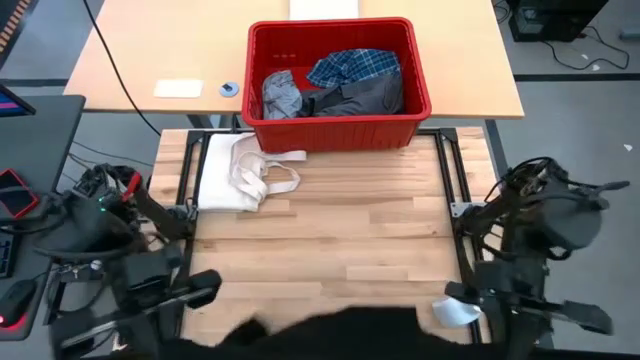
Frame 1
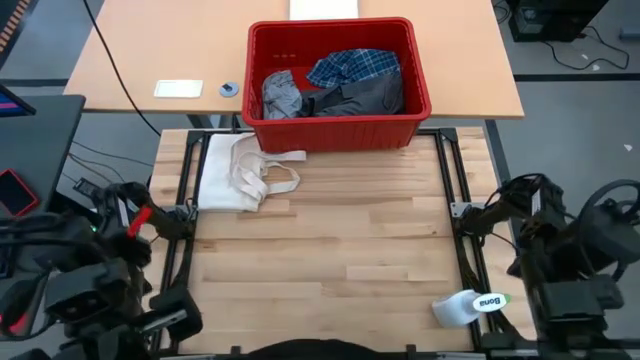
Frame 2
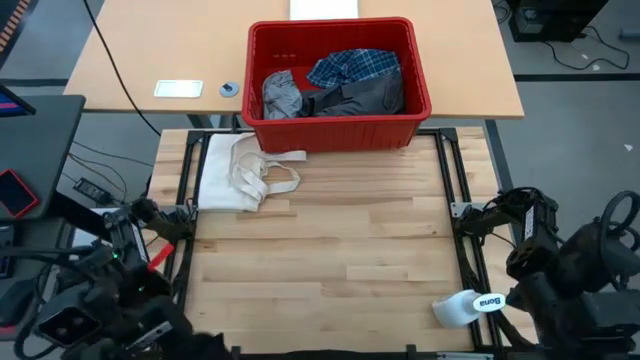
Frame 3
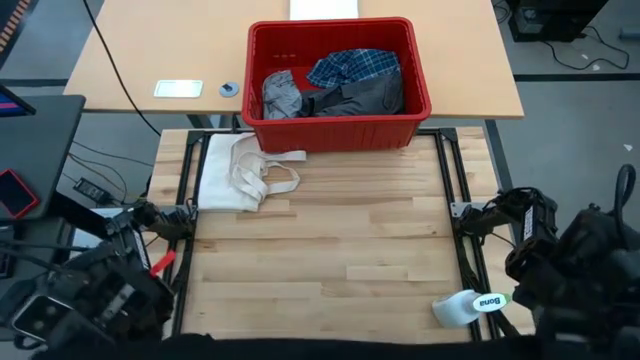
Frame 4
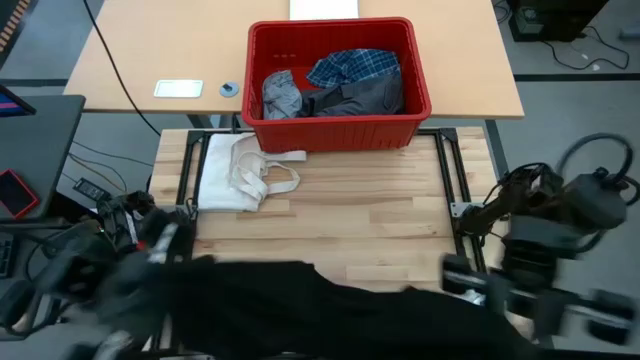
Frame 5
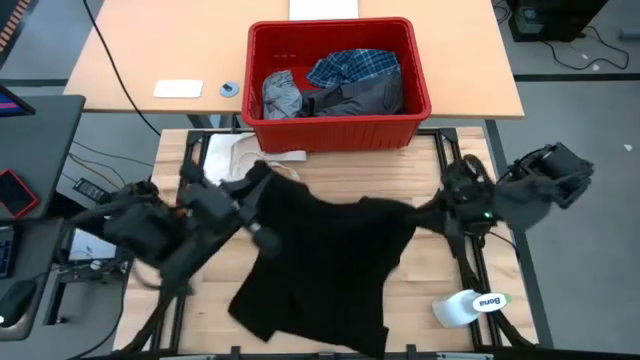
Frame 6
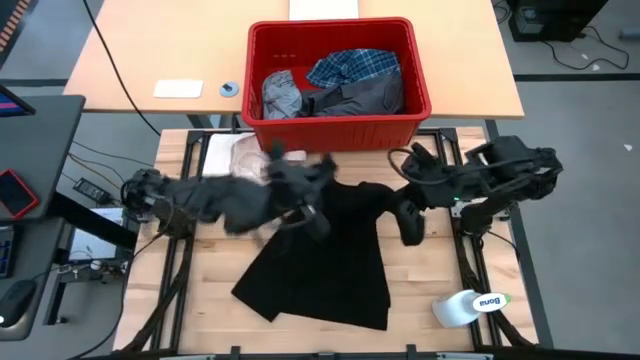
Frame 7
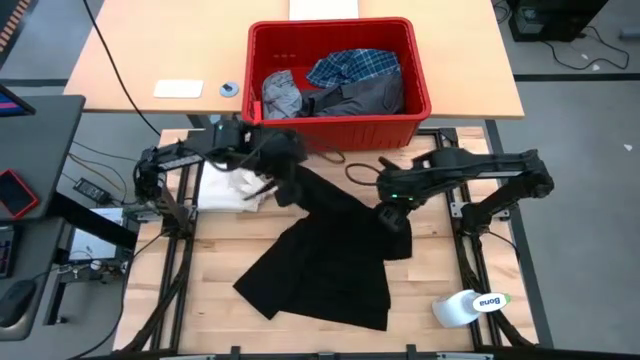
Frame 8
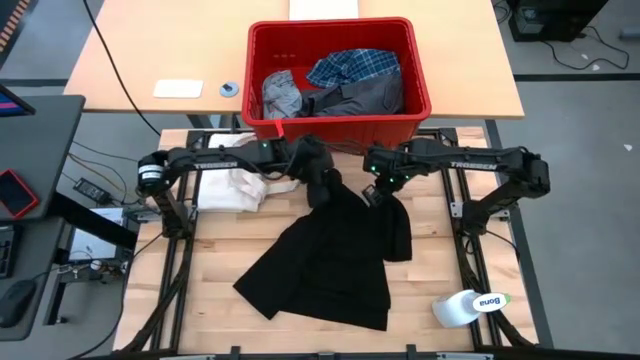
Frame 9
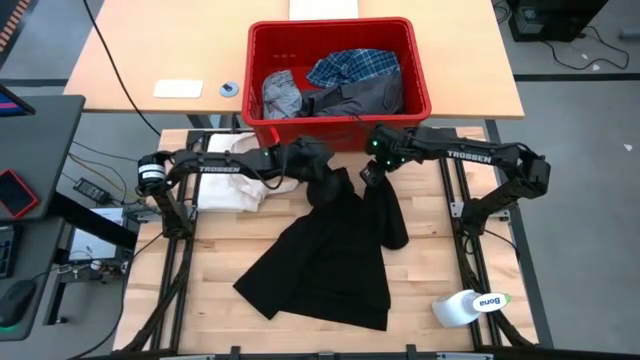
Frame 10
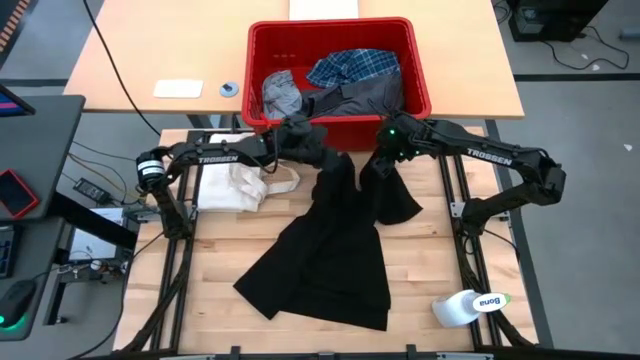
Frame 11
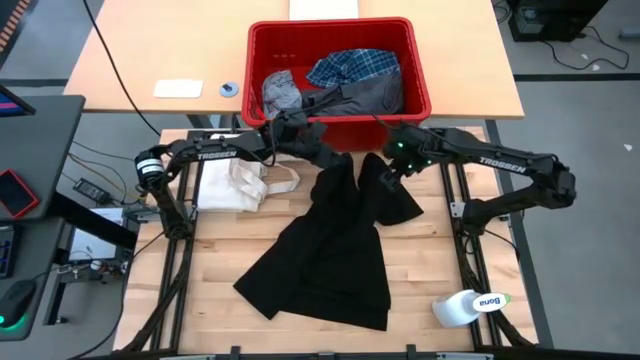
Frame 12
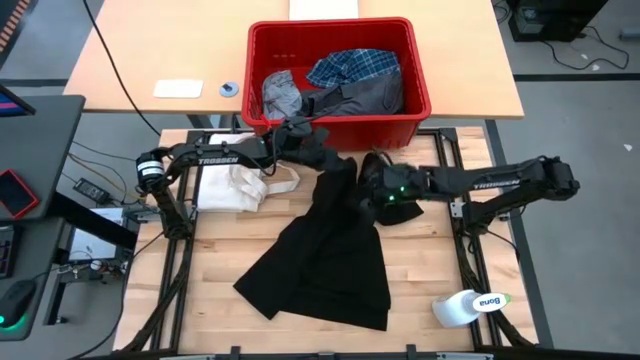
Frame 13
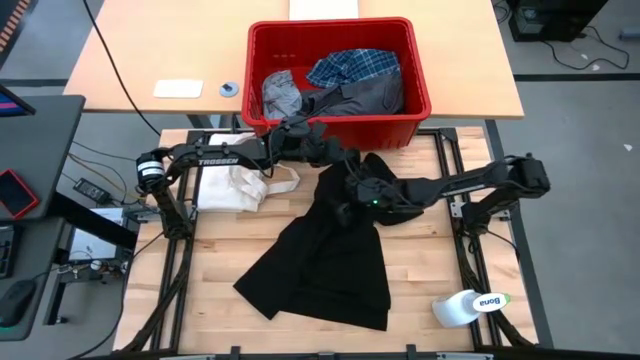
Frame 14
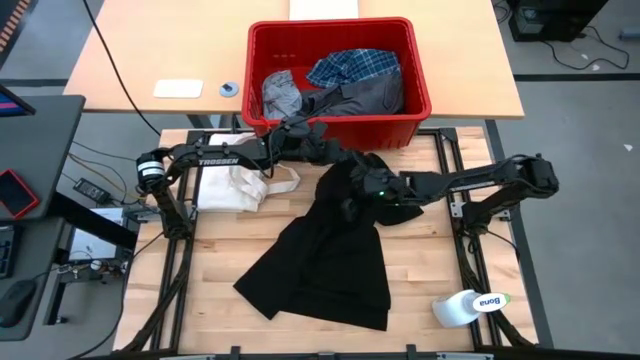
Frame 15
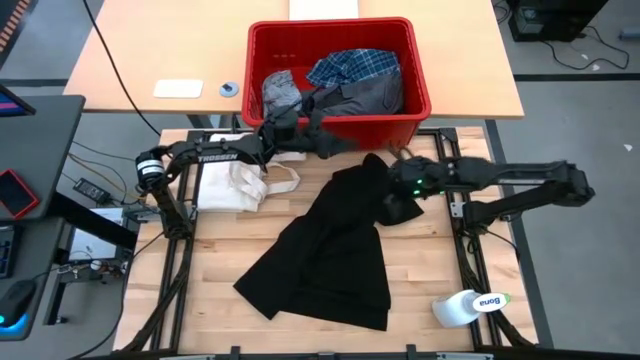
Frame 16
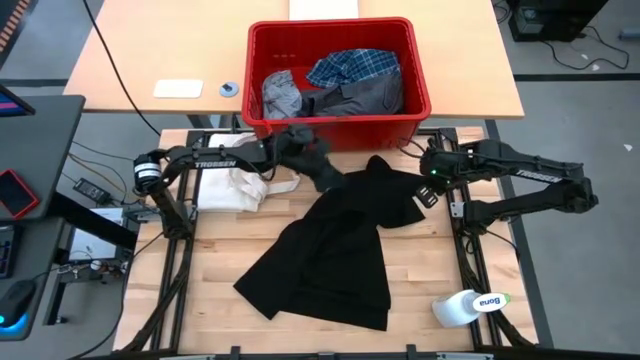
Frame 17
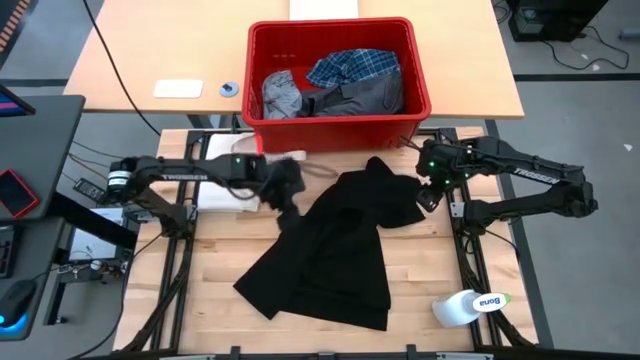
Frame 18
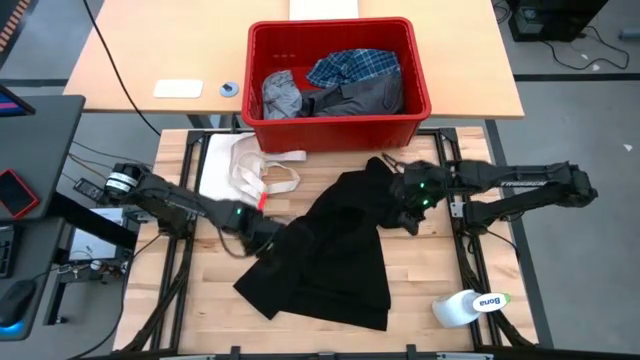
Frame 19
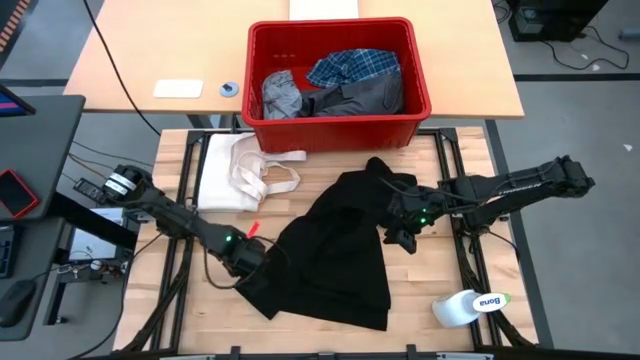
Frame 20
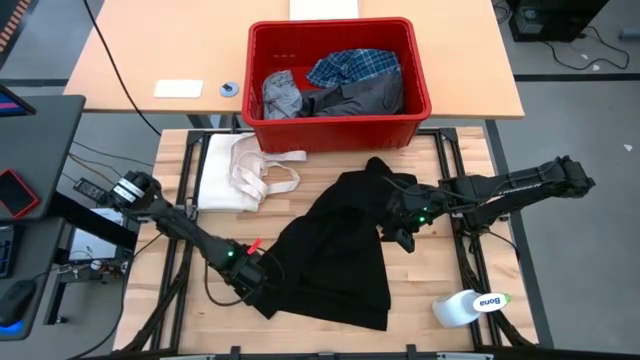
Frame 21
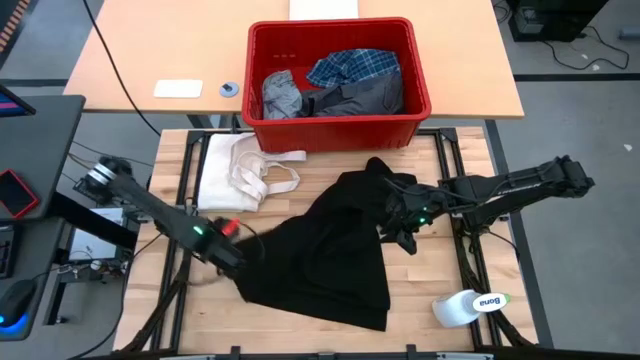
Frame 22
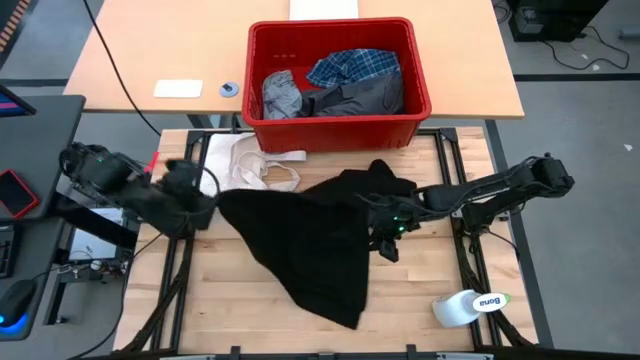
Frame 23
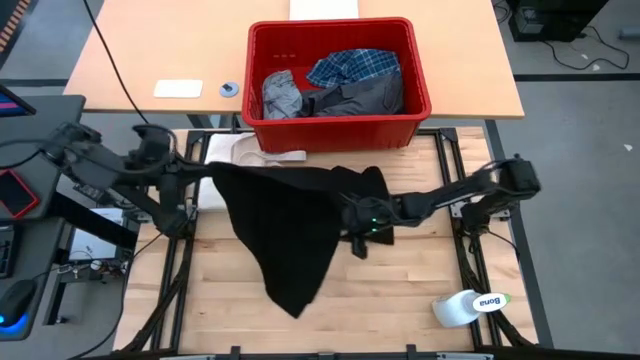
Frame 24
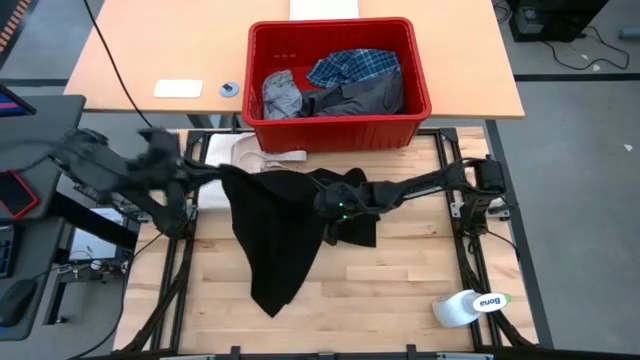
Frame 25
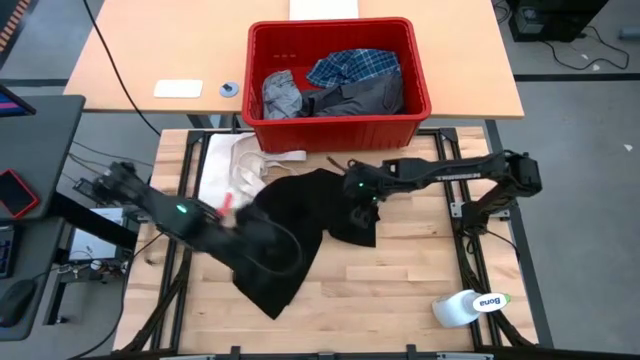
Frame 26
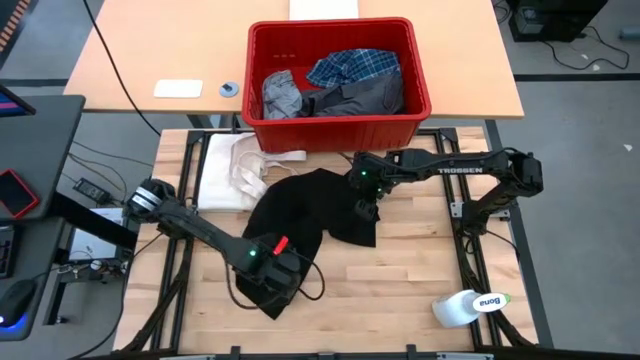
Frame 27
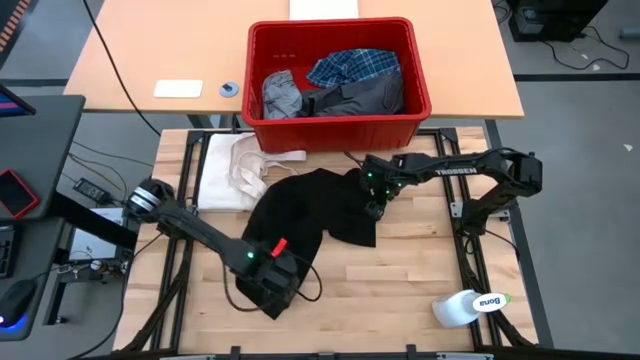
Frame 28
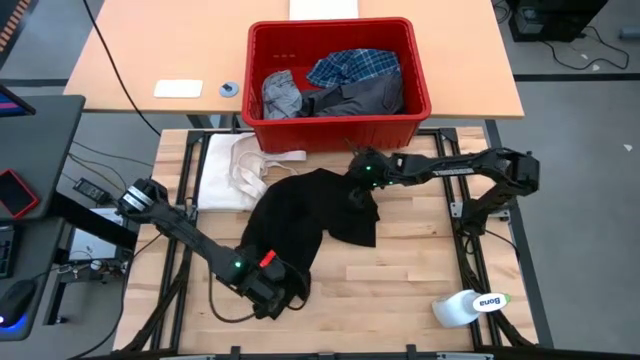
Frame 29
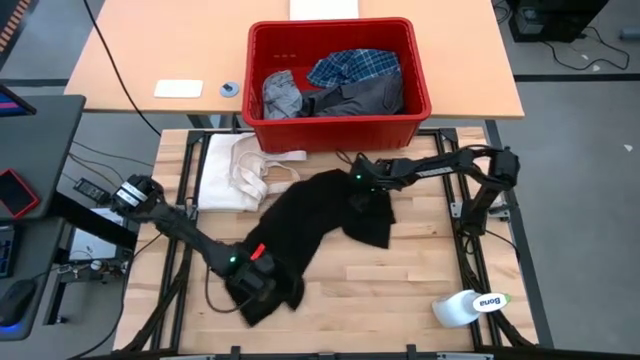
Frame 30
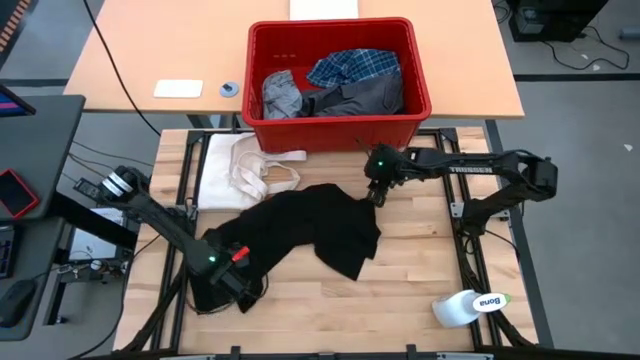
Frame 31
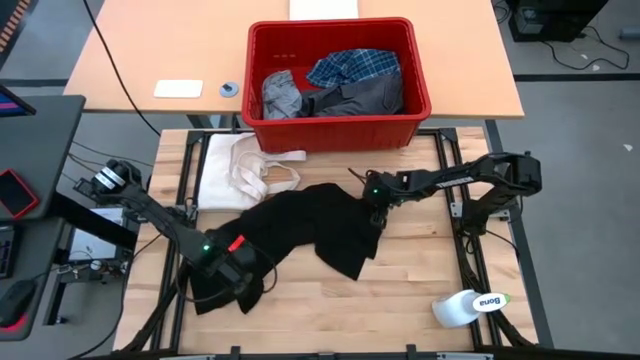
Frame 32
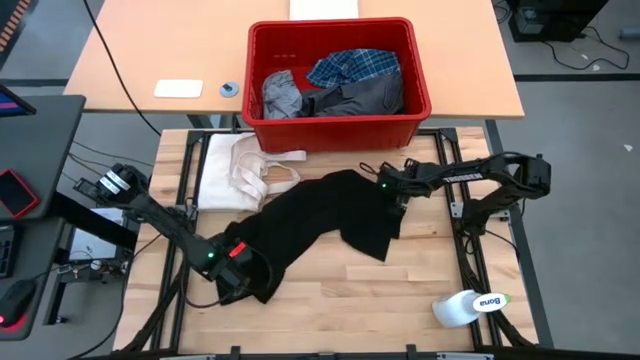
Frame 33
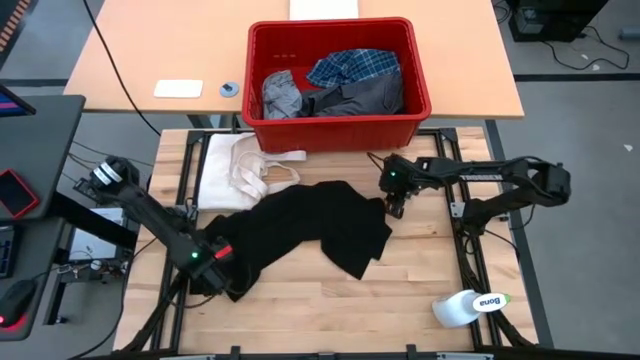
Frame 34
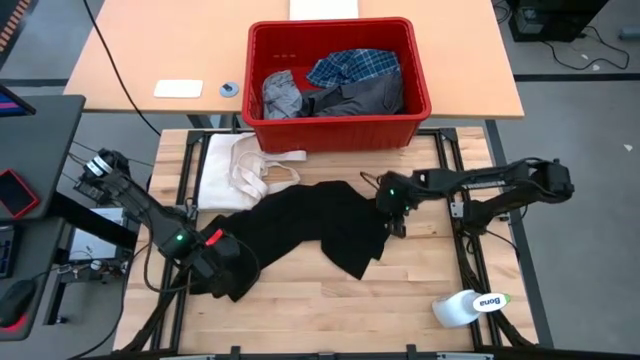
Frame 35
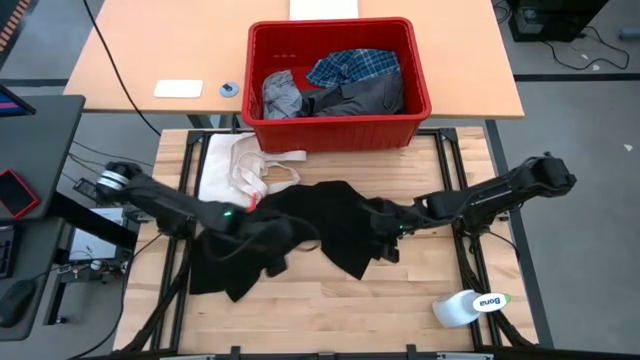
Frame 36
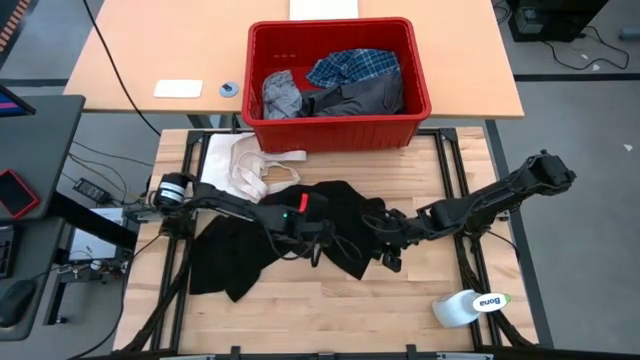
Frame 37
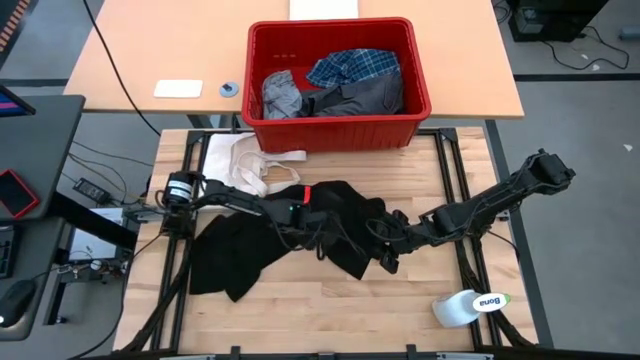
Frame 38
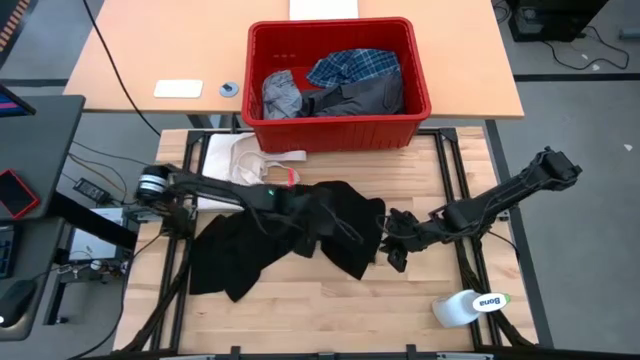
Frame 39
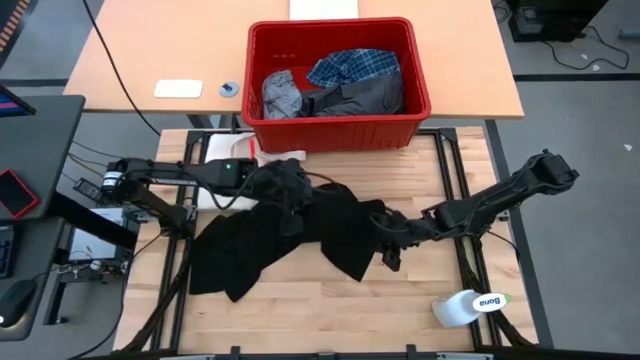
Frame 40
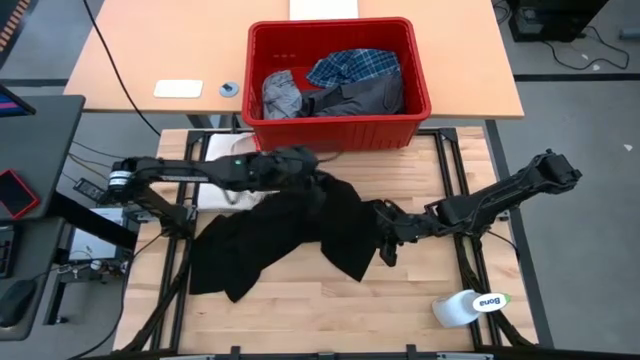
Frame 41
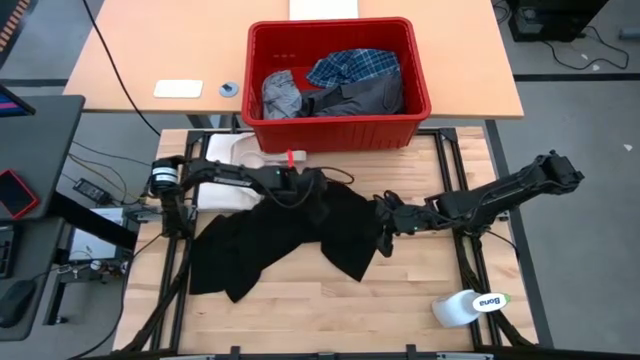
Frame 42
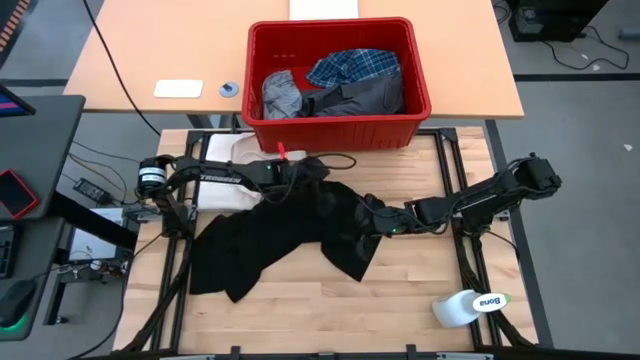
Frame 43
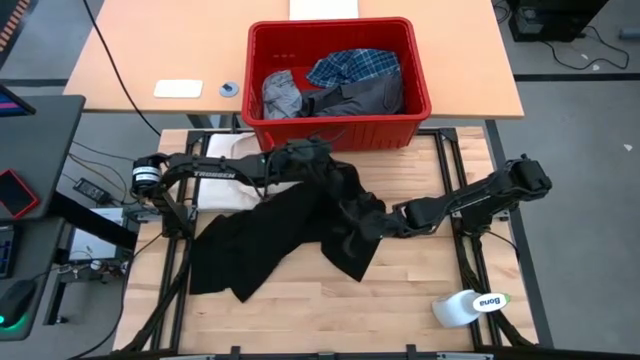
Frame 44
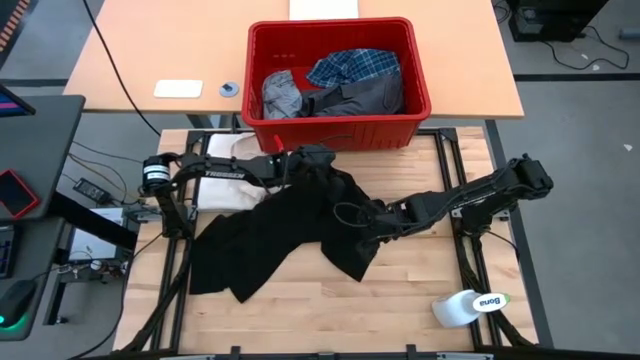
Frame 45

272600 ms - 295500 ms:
Task: Fold Laundry from Bin
Fold the black shirt
